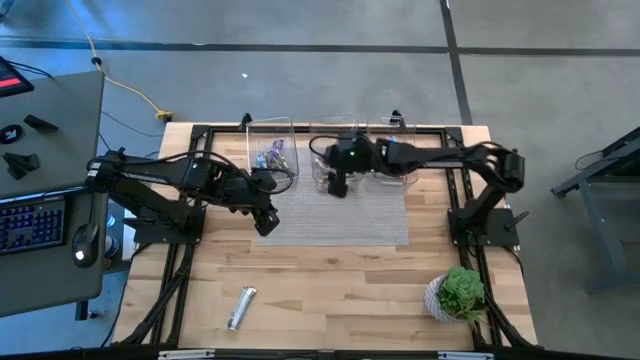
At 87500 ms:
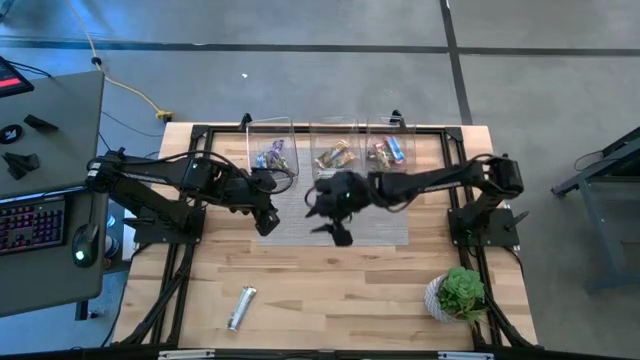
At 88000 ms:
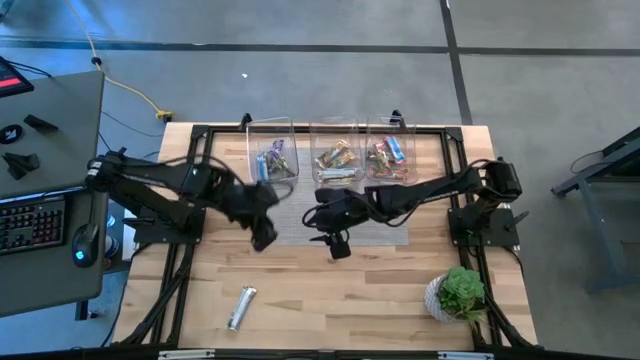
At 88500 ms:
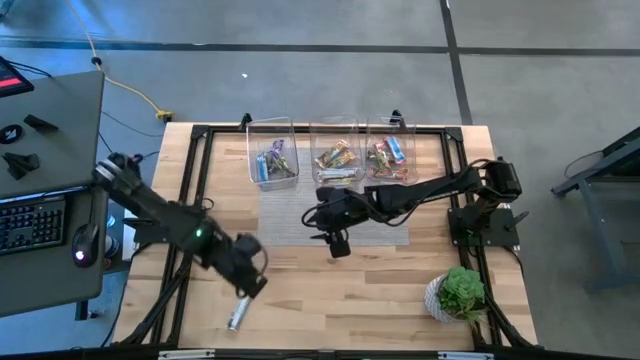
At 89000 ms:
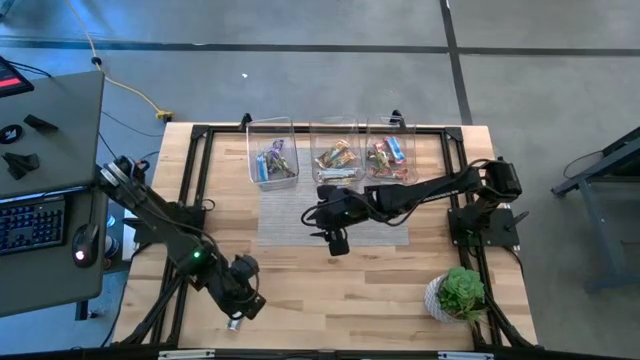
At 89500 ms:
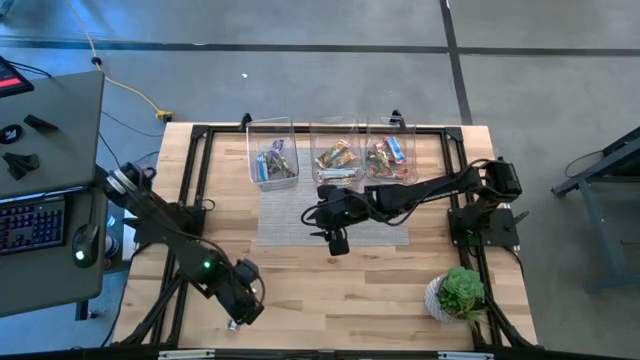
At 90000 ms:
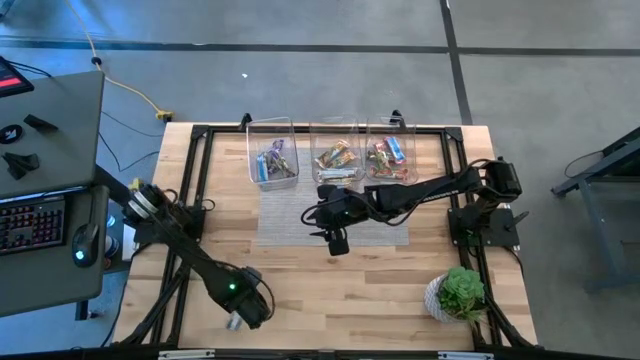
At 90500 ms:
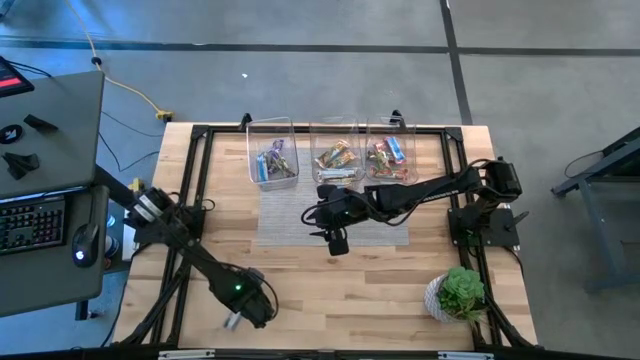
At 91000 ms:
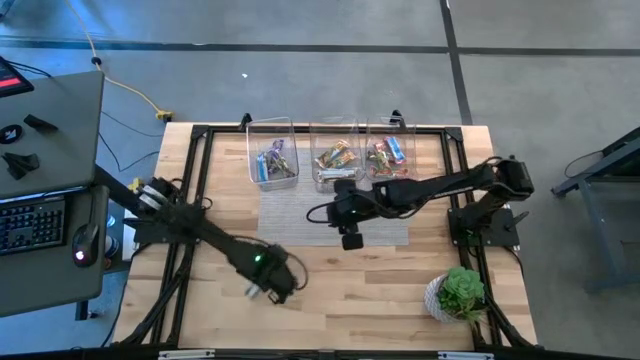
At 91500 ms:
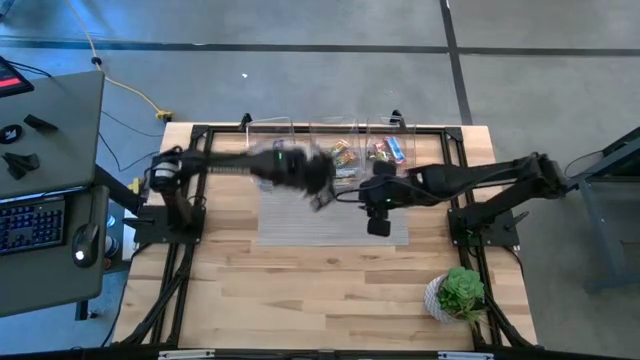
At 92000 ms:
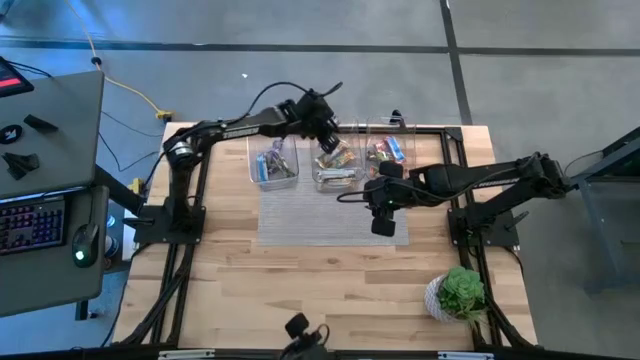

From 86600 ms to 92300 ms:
Task: Pick and place Granola Bars by type
Put the yellow granola bar into the middle transparent bin

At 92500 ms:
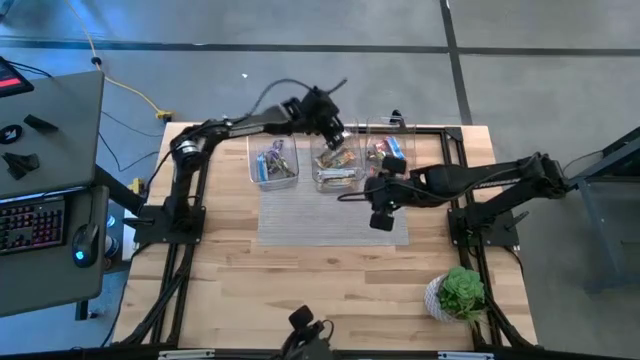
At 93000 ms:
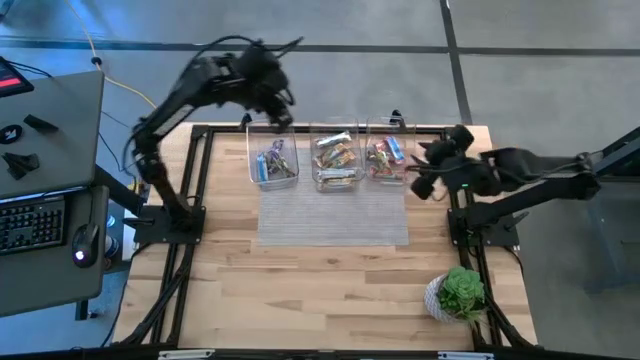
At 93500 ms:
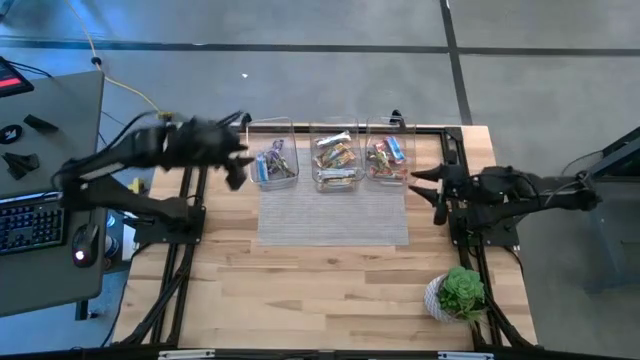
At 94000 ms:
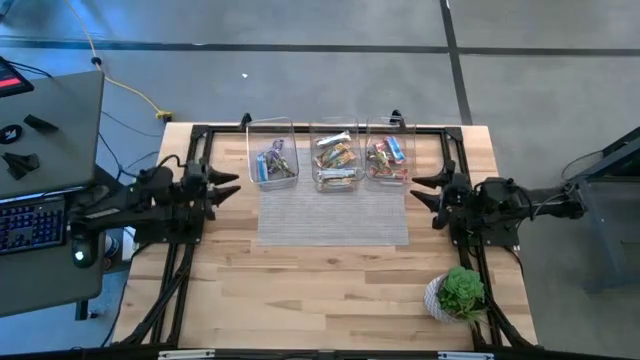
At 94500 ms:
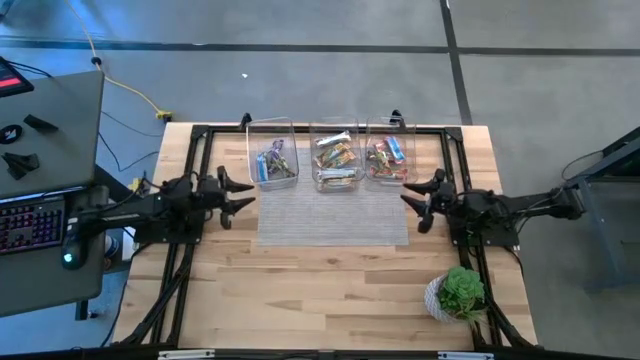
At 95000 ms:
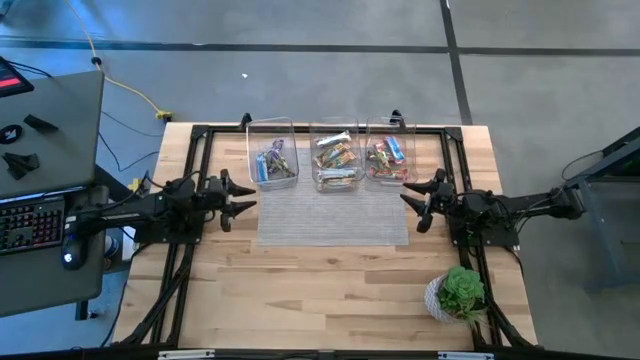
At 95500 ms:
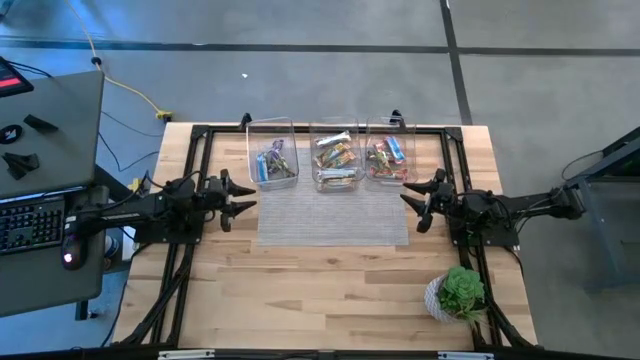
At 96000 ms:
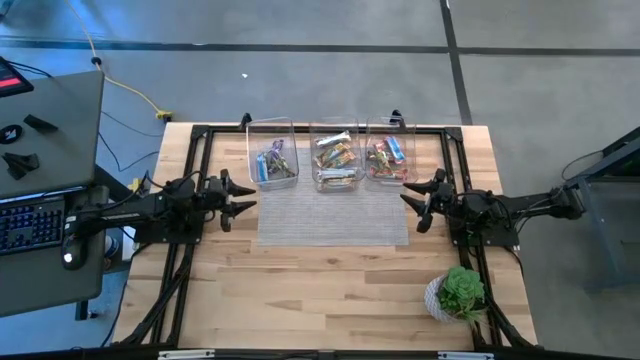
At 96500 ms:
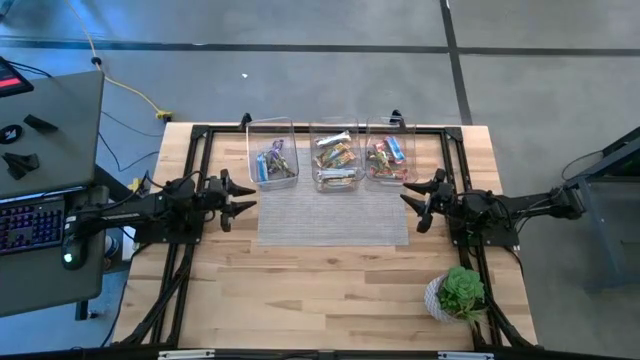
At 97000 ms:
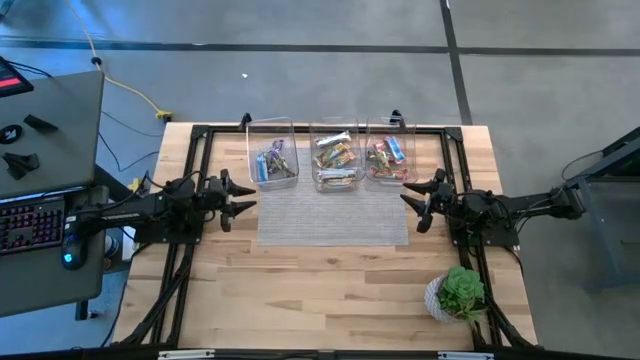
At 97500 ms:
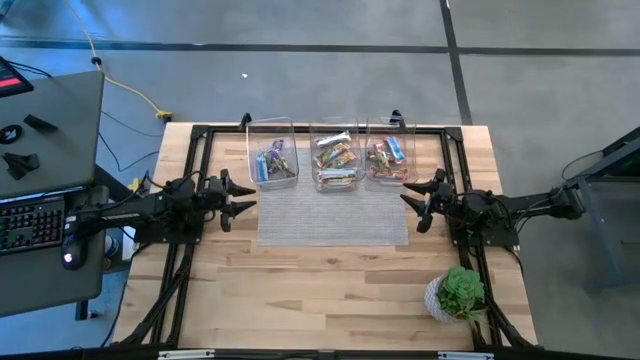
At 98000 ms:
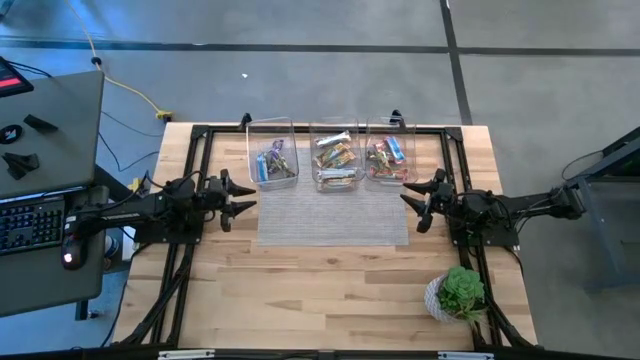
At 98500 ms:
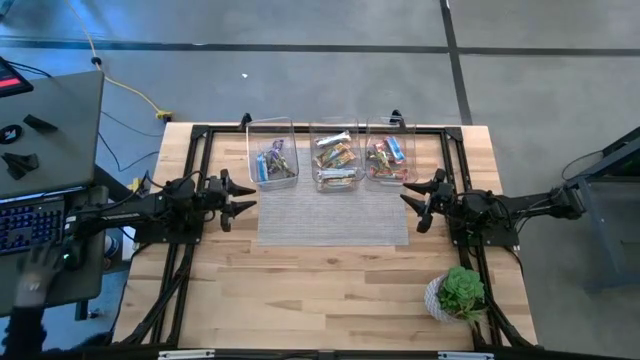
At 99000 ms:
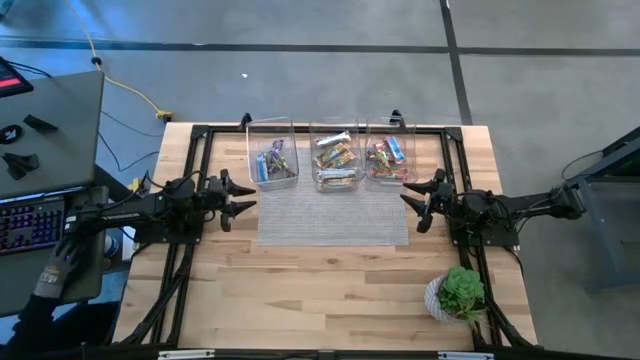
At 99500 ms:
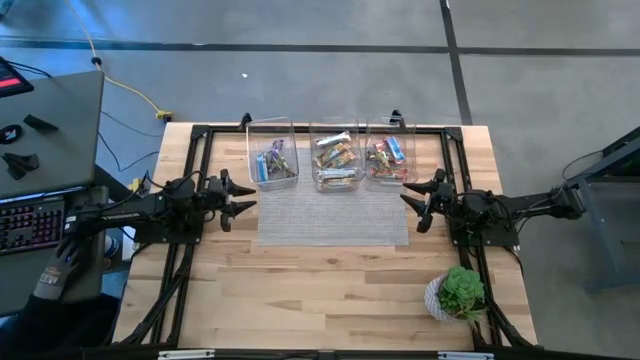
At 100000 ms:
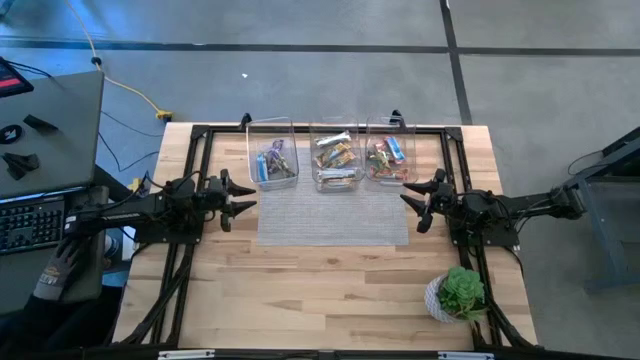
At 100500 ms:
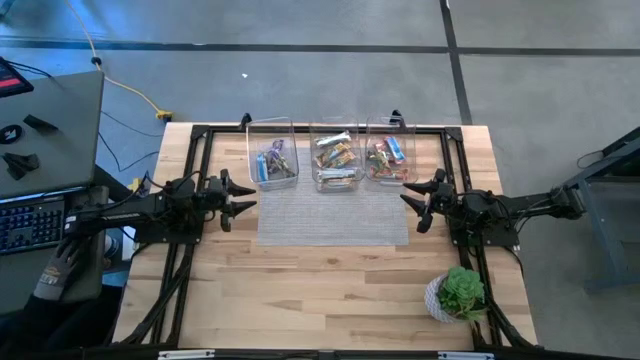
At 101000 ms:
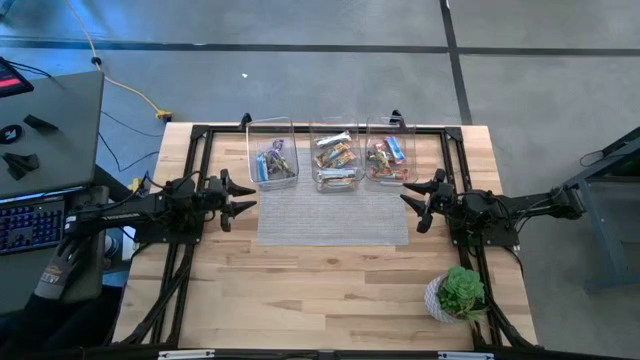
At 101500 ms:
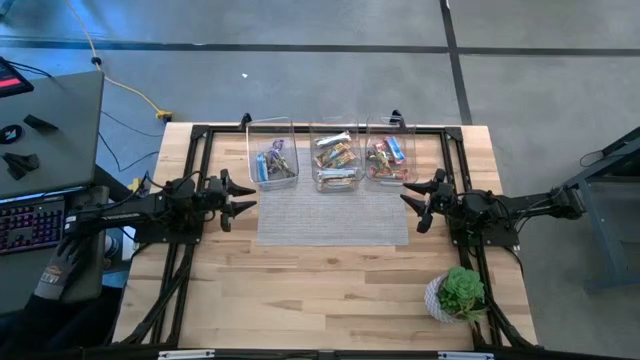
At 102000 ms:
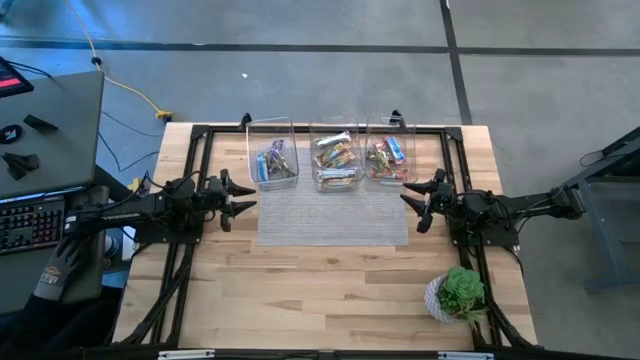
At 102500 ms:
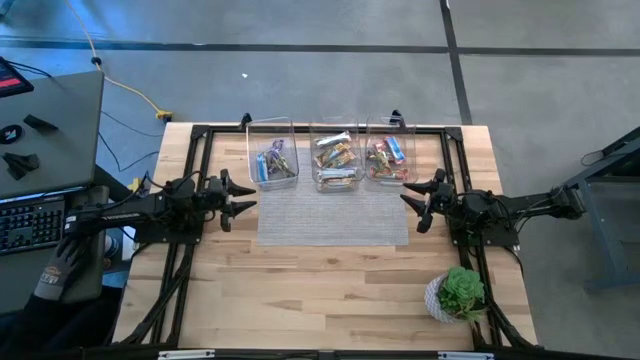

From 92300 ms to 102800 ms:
Return to Home Position

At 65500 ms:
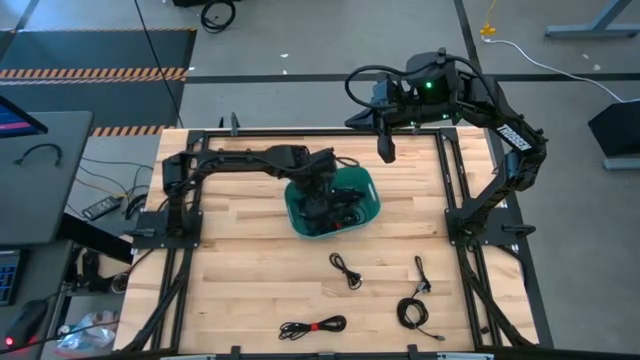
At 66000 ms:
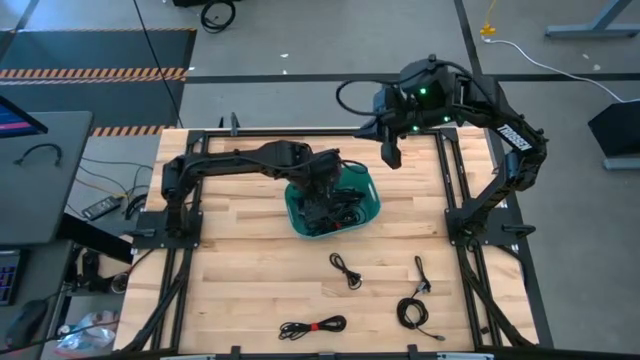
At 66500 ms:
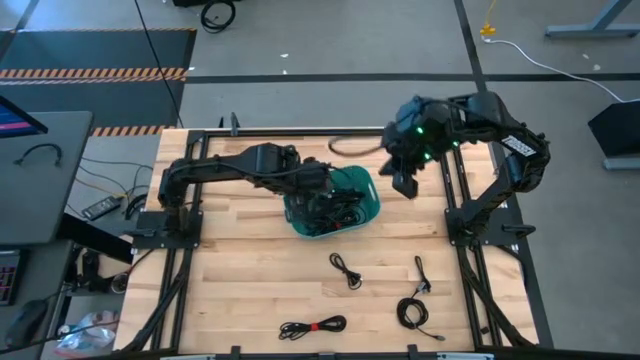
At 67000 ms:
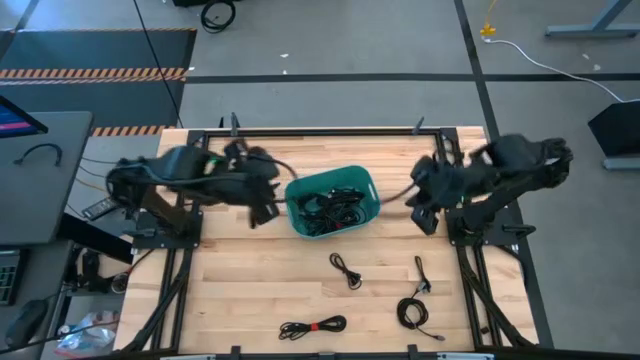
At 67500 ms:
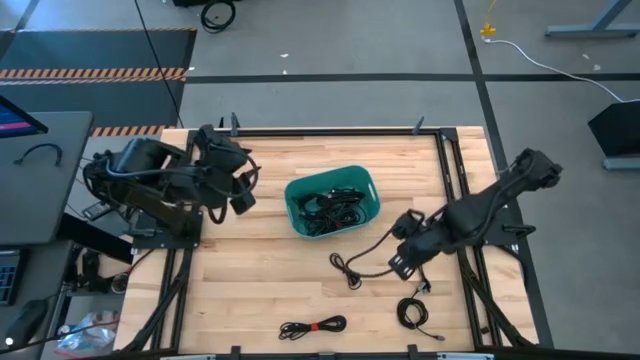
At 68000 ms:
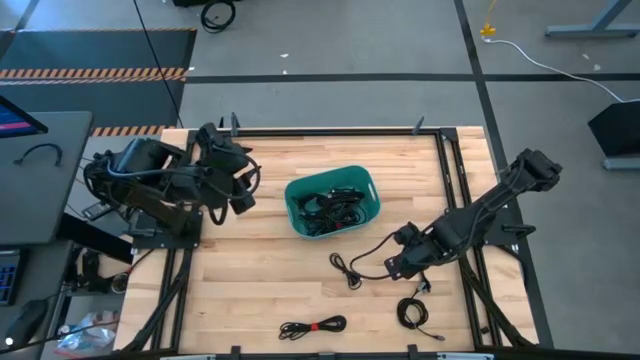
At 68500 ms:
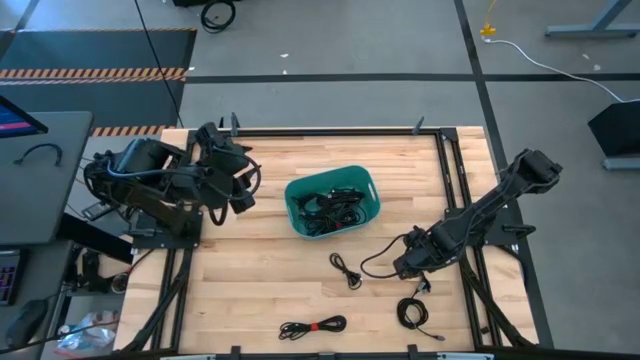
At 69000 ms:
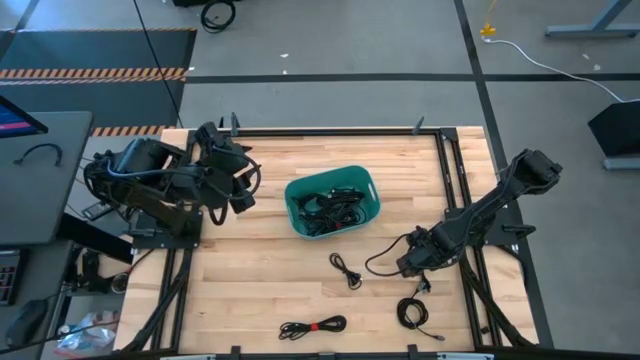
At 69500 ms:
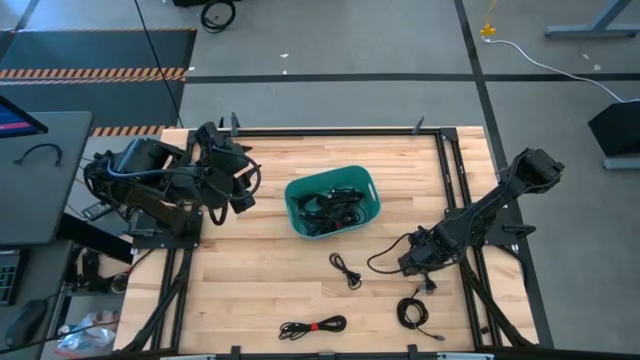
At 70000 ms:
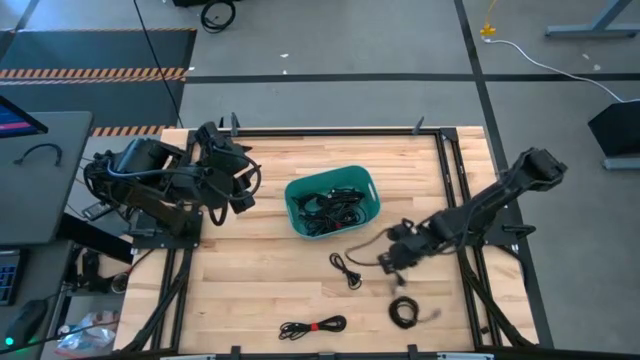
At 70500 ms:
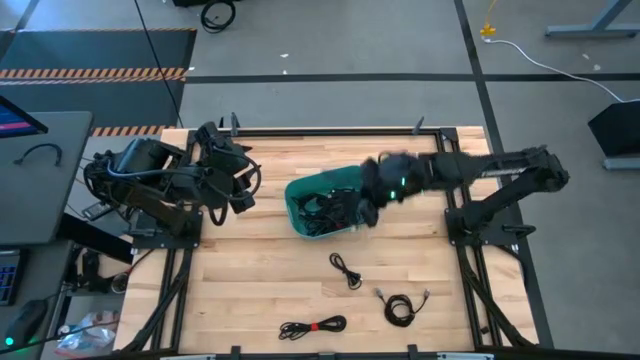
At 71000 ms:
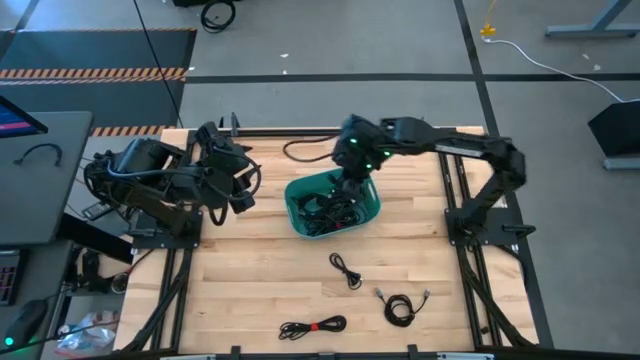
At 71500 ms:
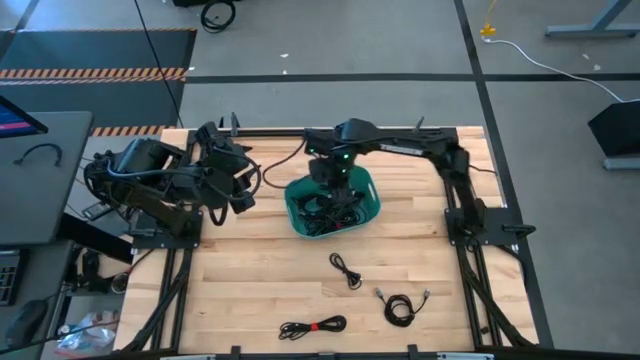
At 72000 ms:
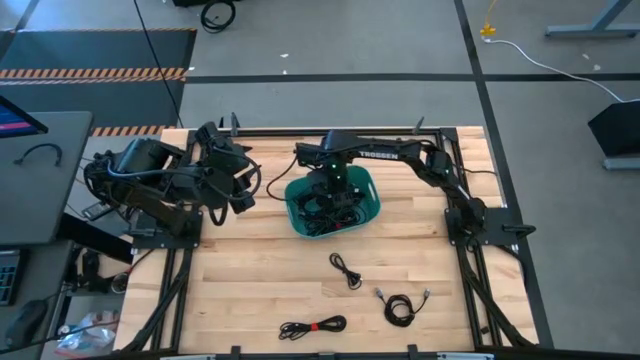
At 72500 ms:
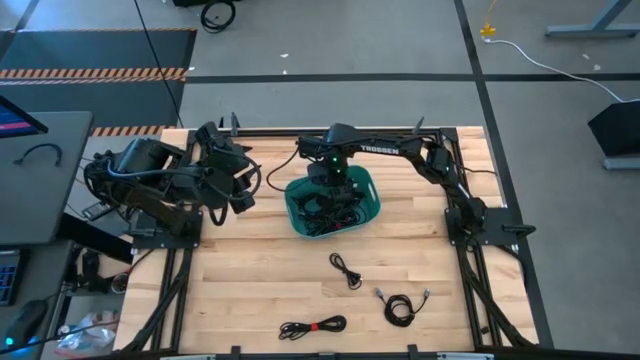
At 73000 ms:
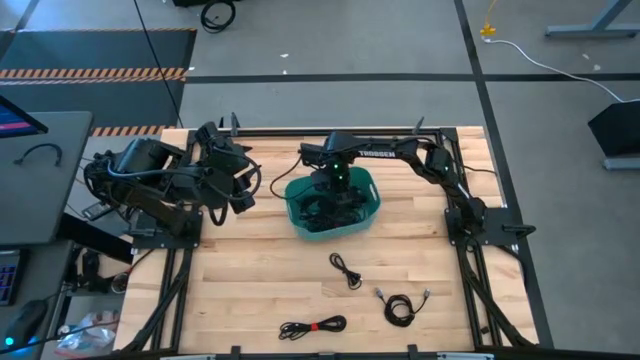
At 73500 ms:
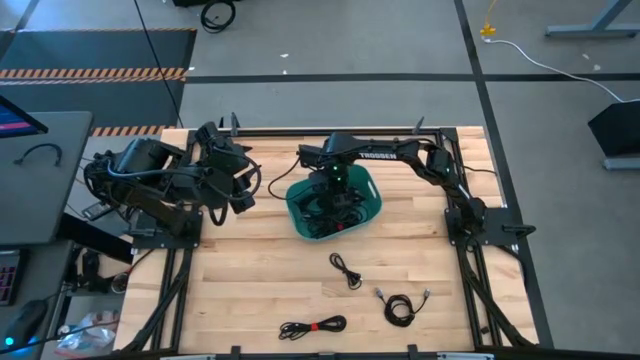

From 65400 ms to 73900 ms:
Task: Pick and place USB-C Cables
Put the black charger cable into the green bin
